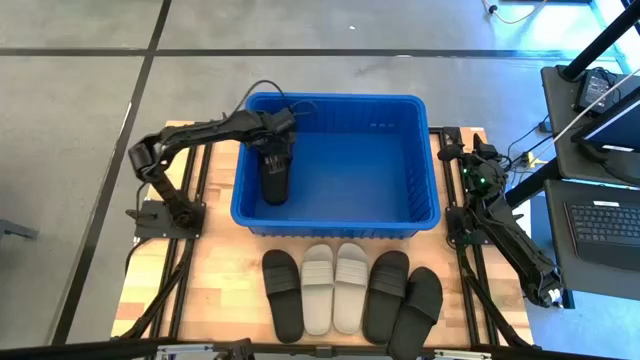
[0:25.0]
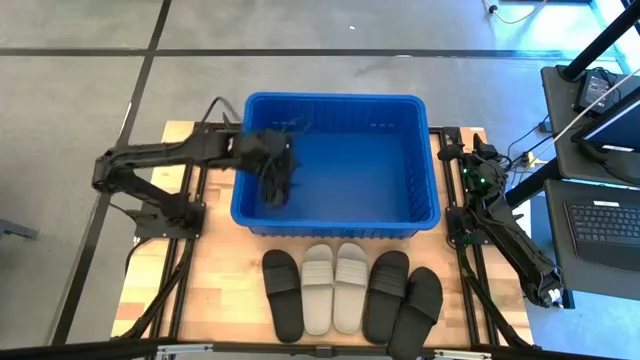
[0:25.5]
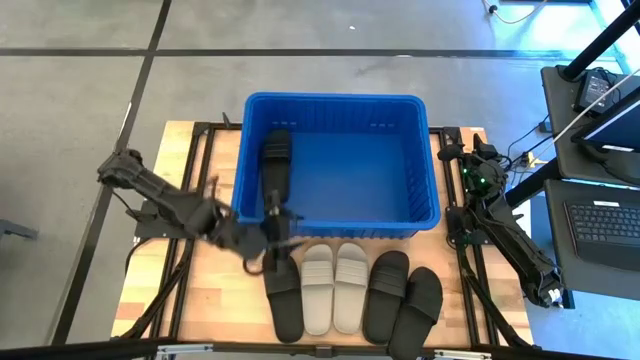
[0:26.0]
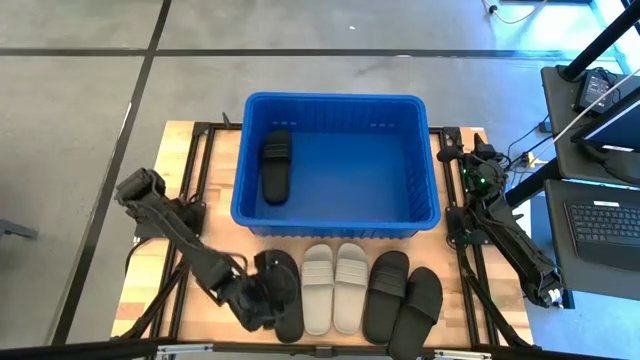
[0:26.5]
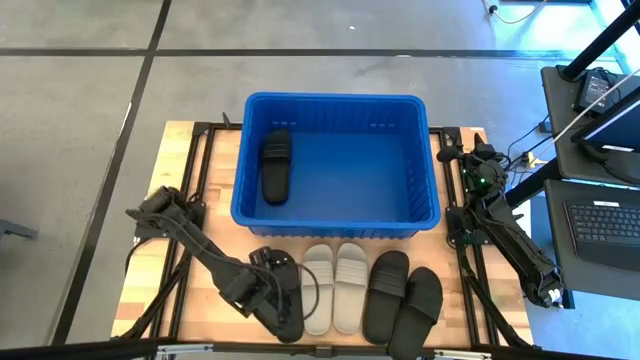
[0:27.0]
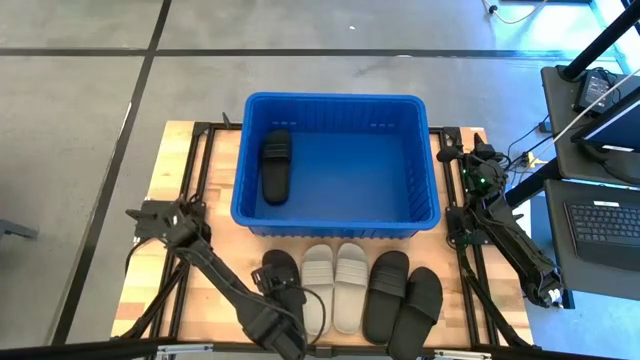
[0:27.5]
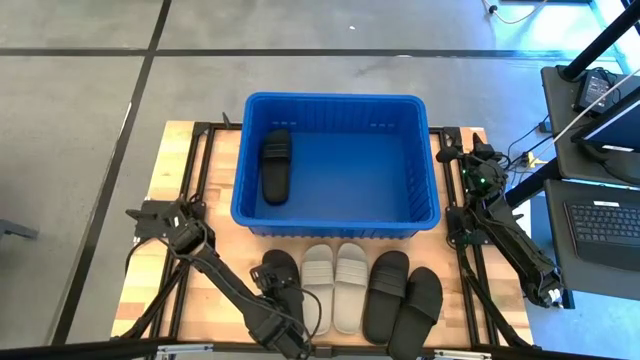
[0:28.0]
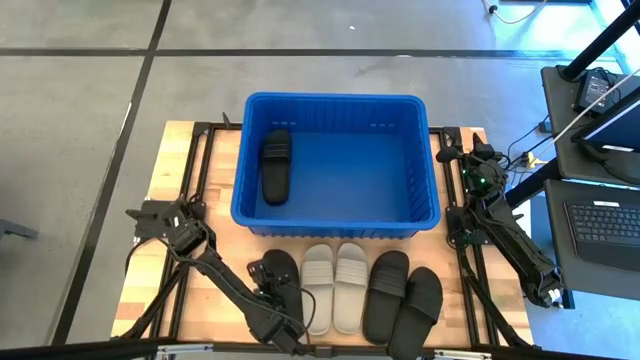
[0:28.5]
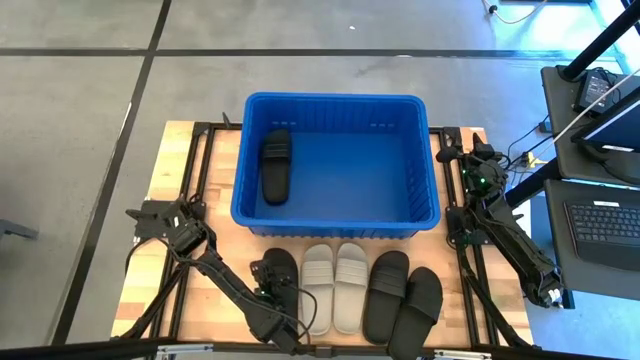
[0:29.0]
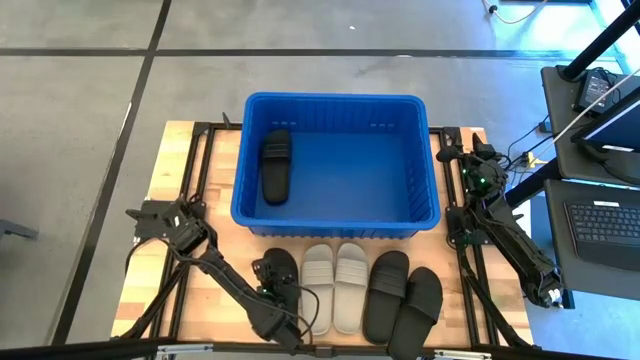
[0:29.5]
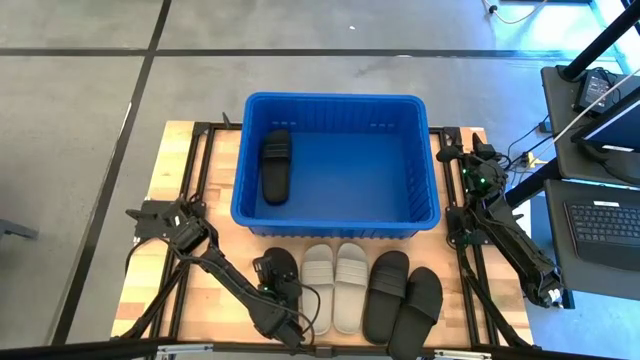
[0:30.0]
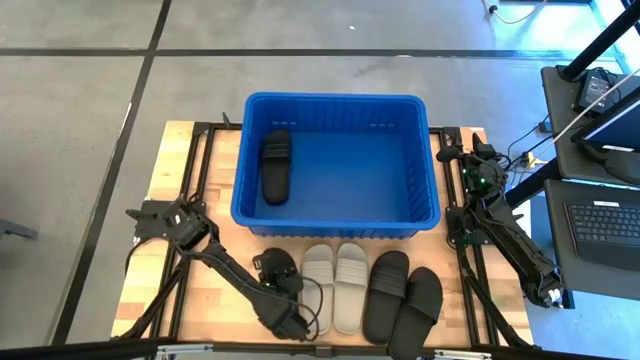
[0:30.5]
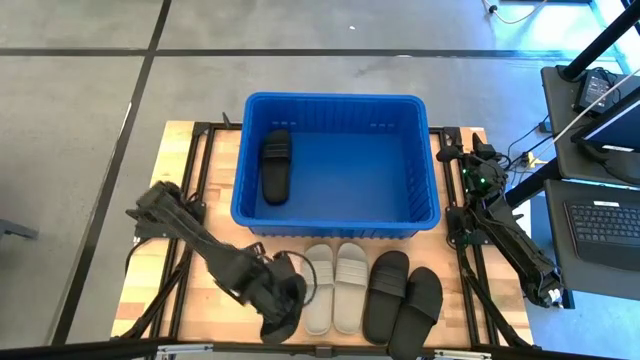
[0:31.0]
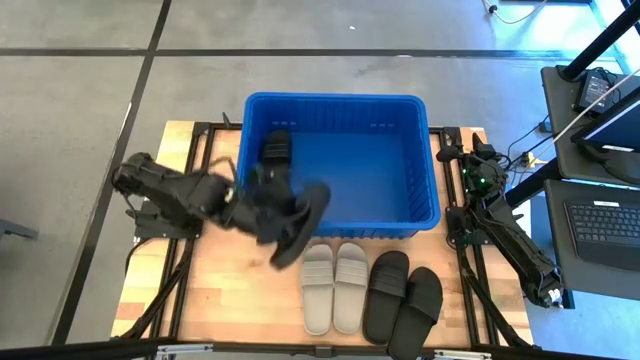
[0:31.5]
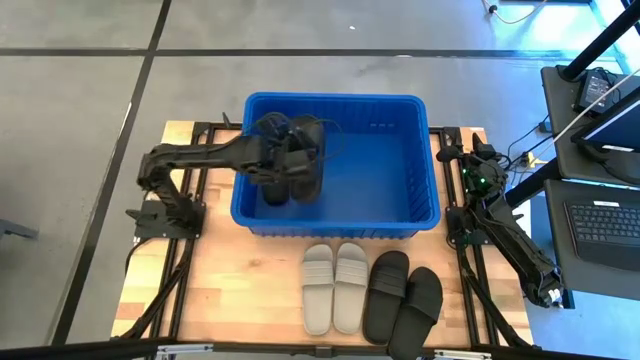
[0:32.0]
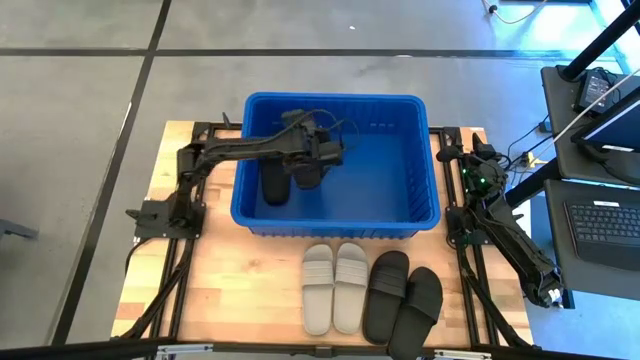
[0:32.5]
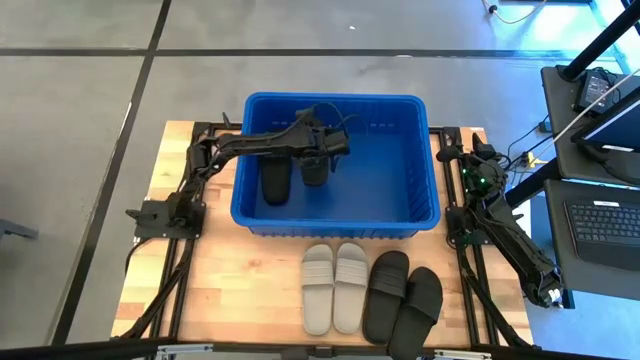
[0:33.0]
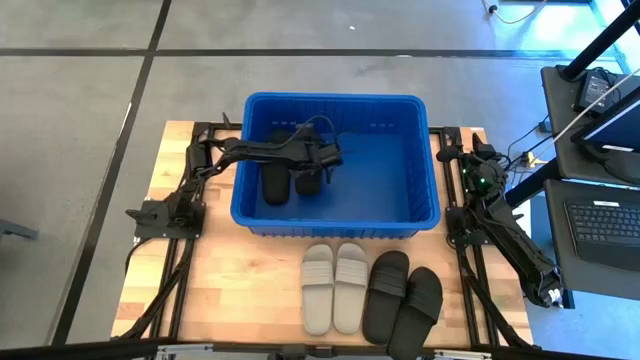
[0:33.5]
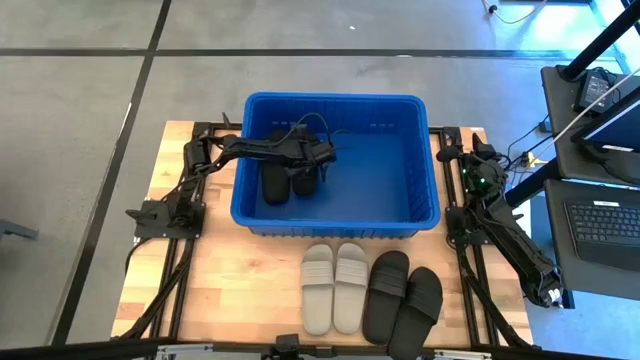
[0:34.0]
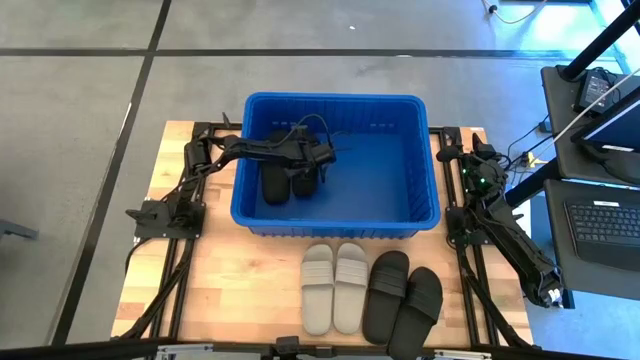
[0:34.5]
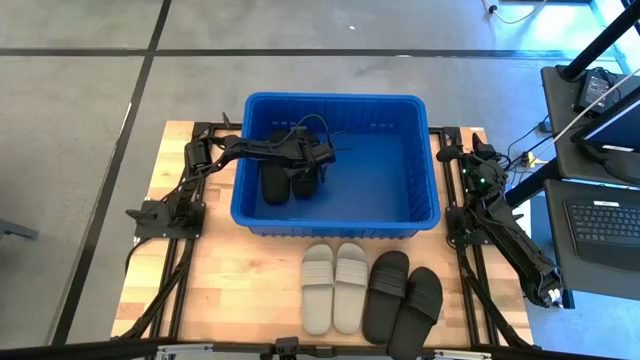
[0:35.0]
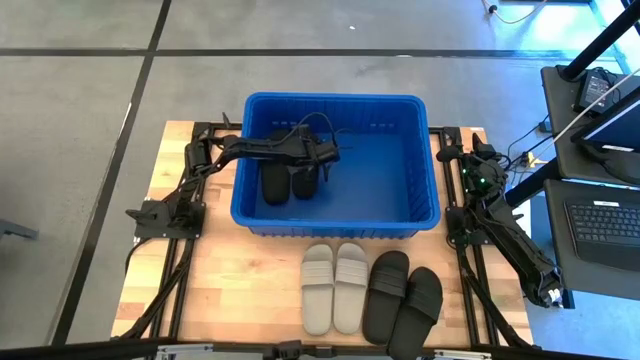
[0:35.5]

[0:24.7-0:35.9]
Task: Pick and place slides into bin
Put the black slipper into the blue container

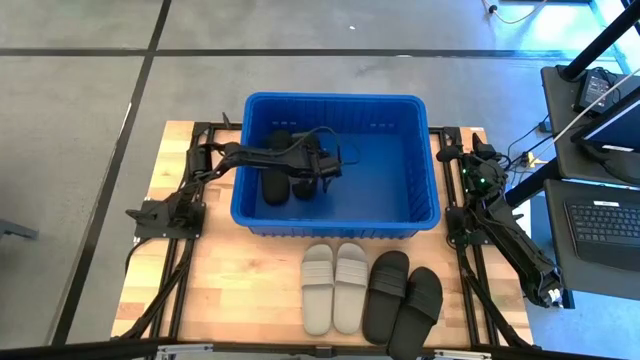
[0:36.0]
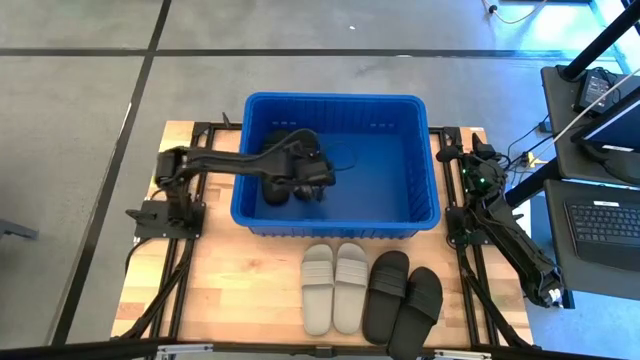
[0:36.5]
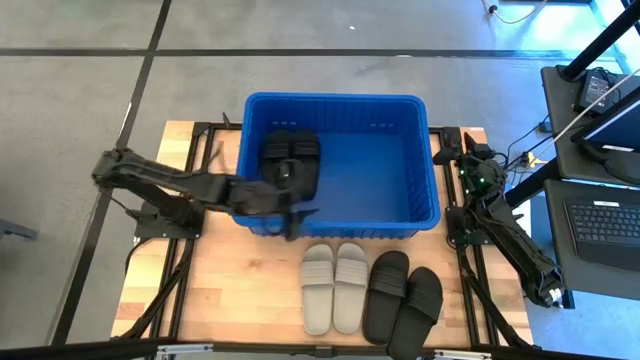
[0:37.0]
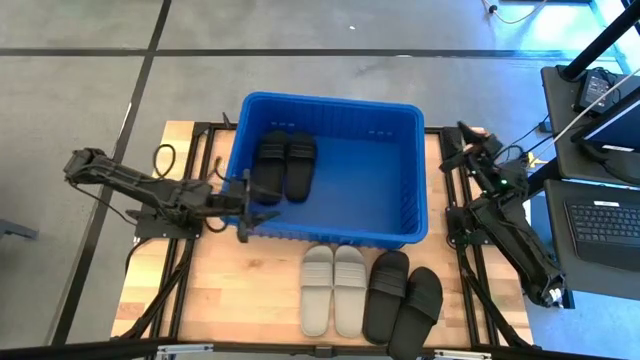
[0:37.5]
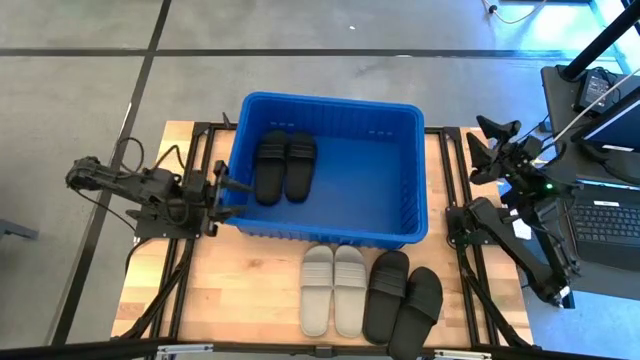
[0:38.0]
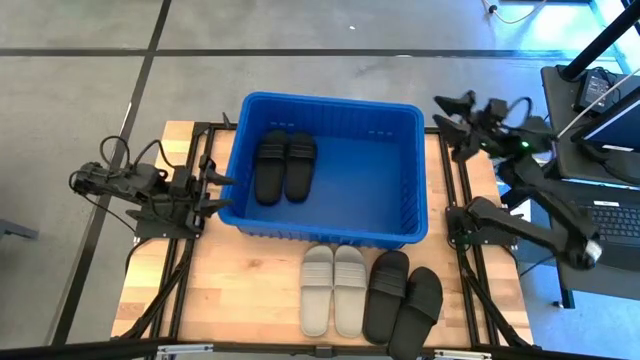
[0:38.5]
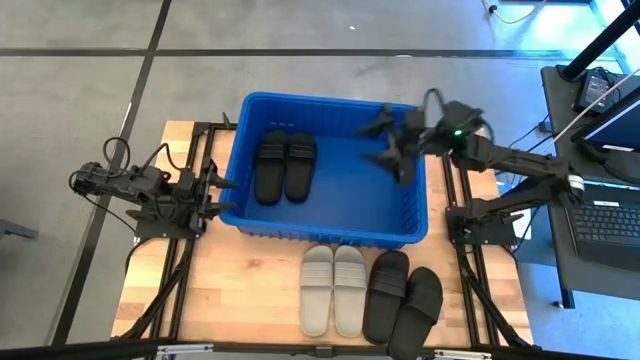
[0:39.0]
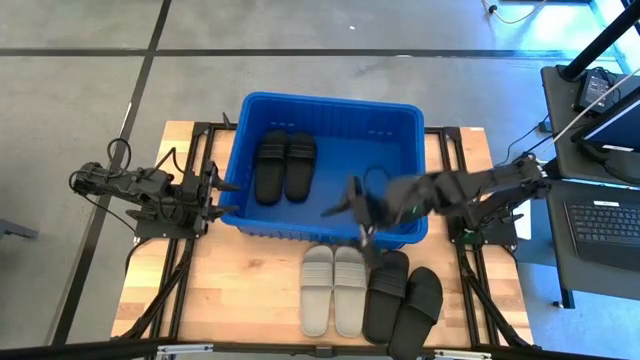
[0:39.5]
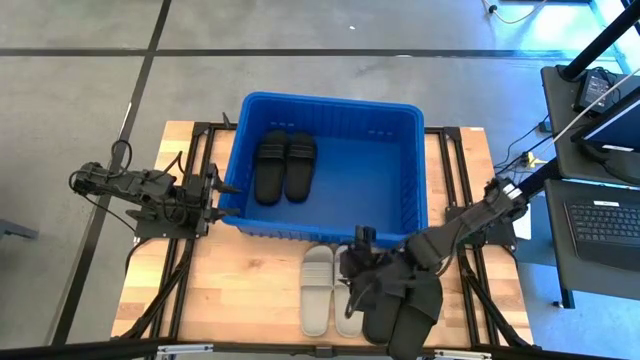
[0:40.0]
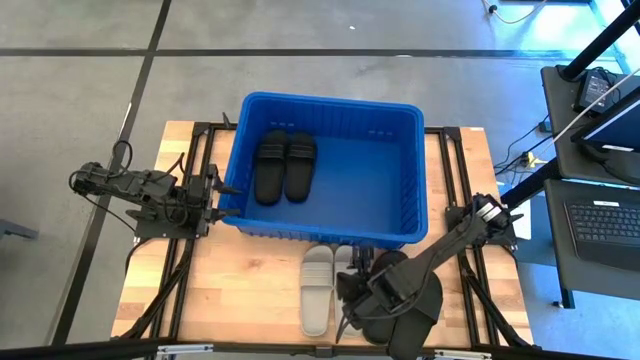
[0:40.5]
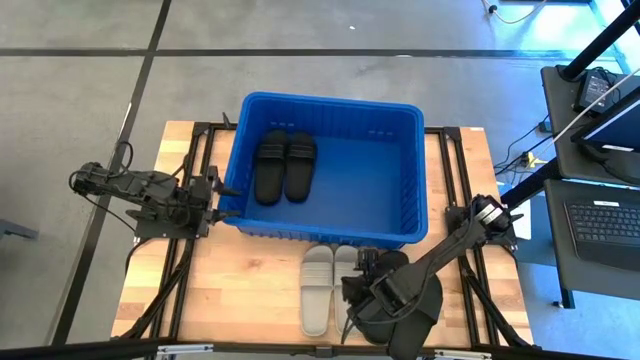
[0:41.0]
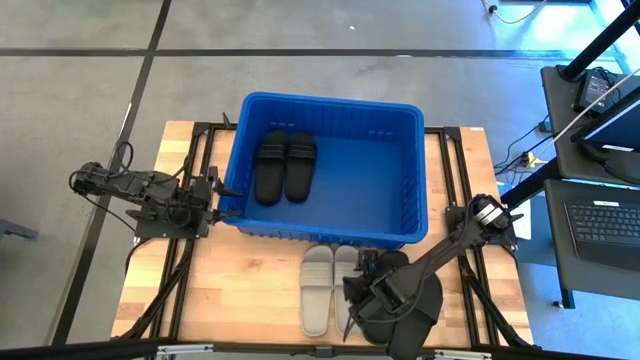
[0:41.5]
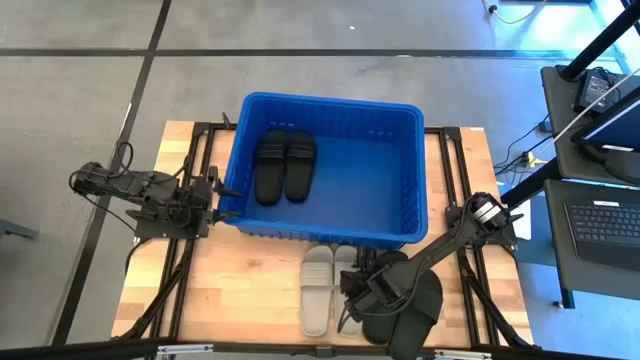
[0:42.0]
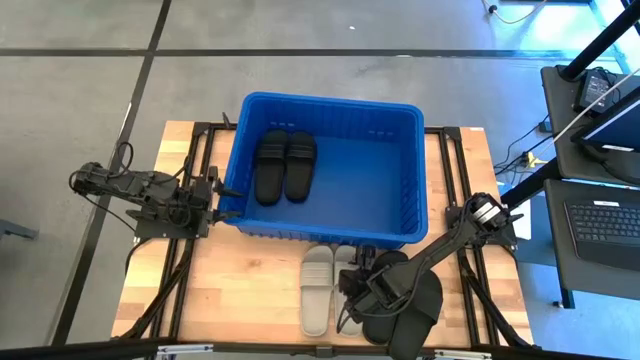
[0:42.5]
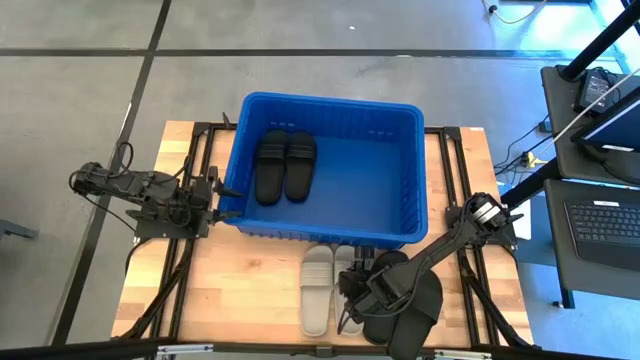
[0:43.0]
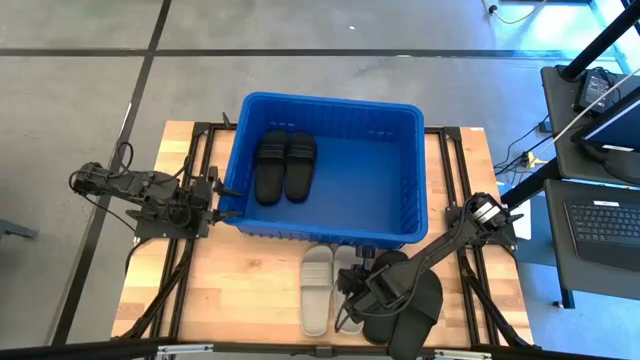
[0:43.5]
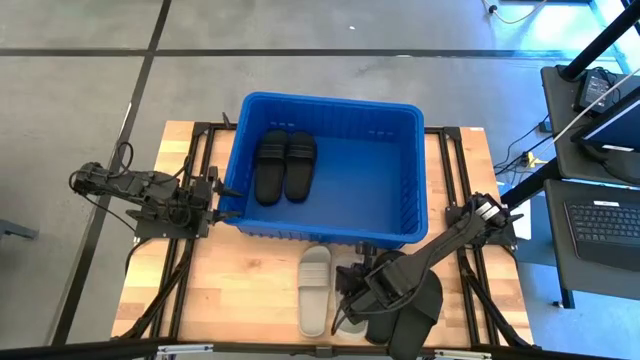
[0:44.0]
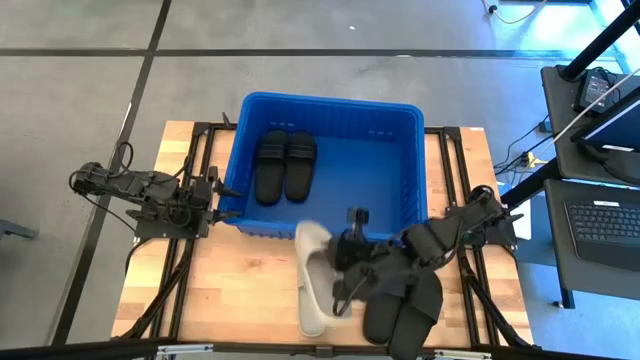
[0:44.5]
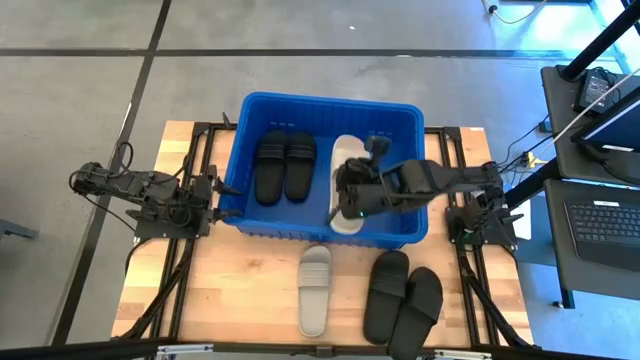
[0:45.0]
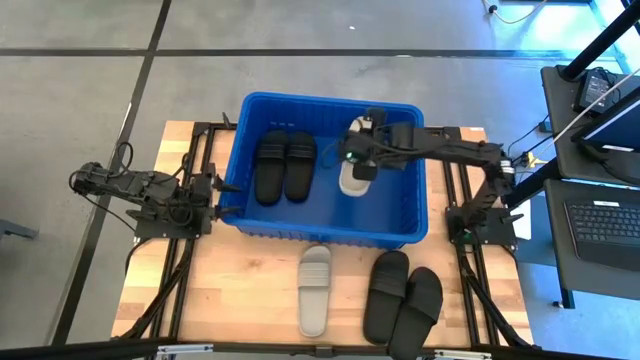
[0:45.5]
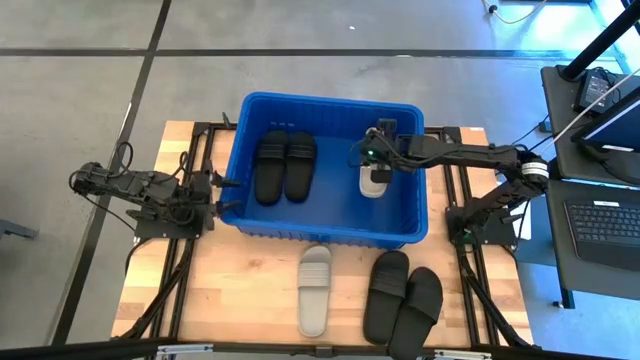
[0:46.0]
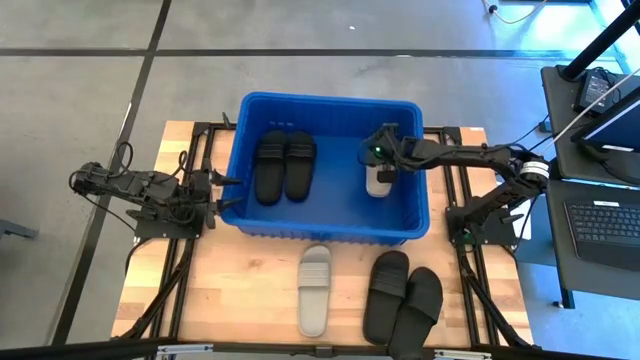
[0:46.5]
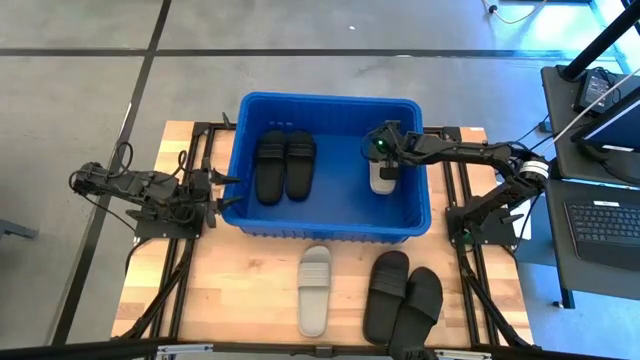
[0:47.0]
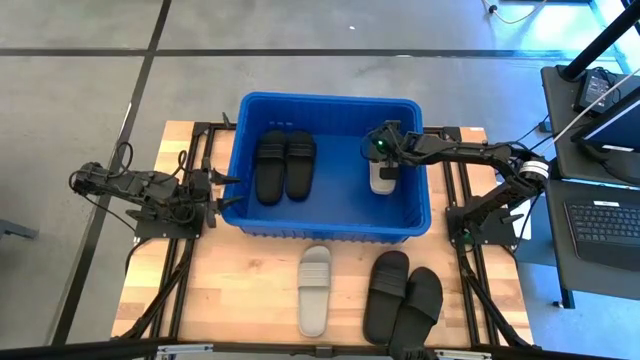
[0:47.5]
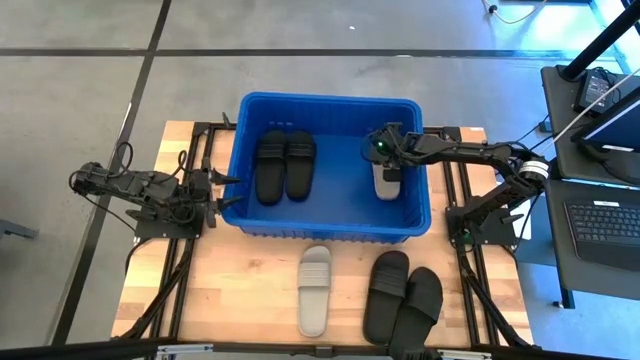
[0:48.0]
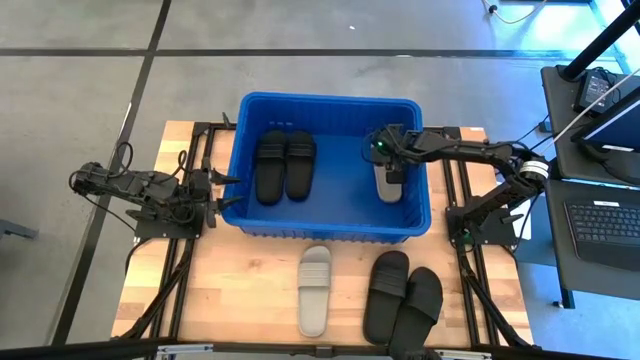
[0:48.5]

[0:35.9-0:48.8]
Put the gray slipper into the blue container
